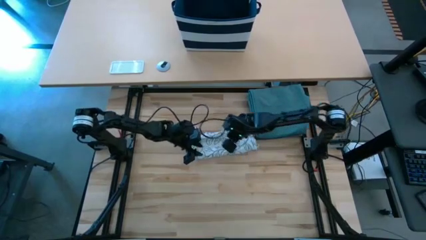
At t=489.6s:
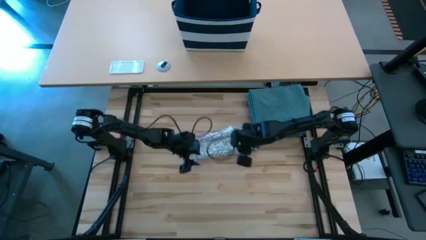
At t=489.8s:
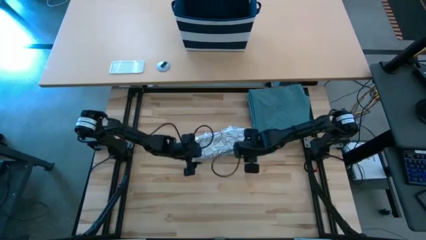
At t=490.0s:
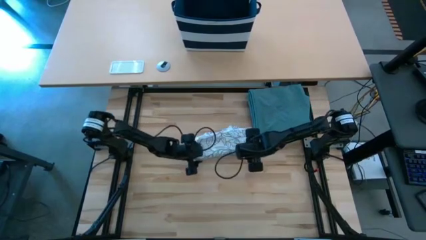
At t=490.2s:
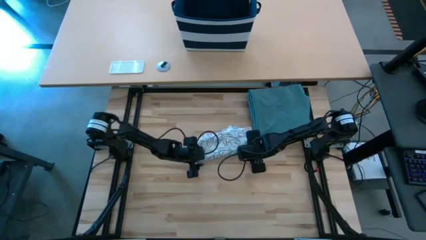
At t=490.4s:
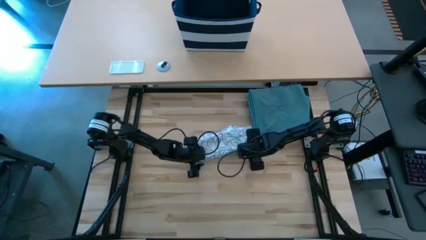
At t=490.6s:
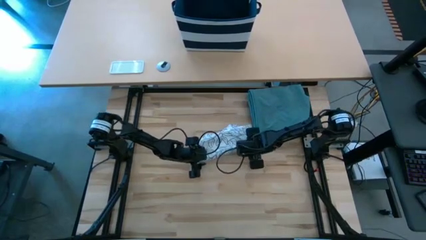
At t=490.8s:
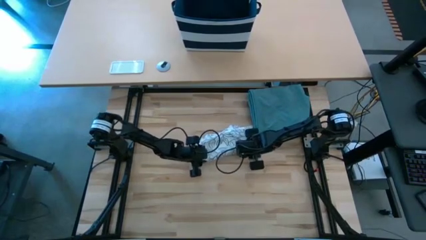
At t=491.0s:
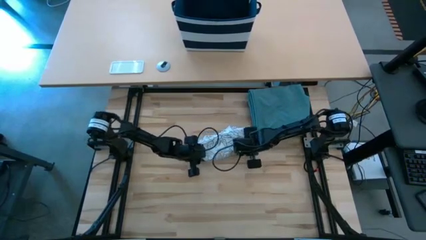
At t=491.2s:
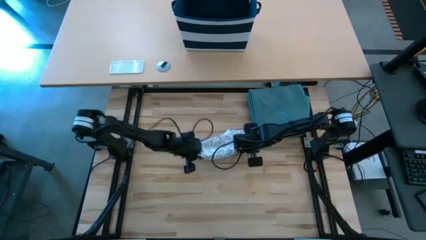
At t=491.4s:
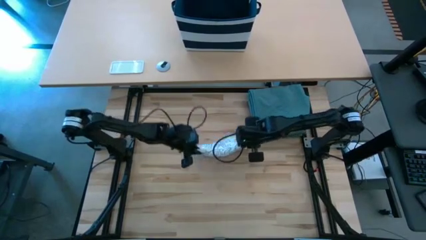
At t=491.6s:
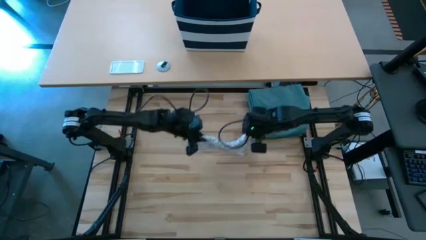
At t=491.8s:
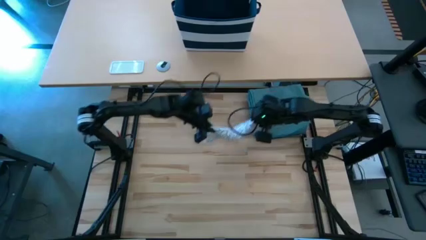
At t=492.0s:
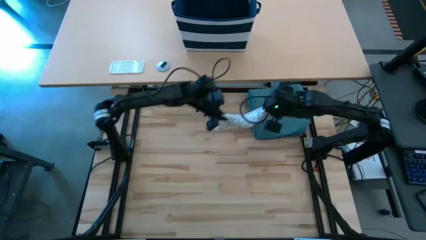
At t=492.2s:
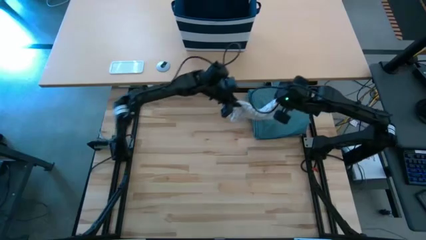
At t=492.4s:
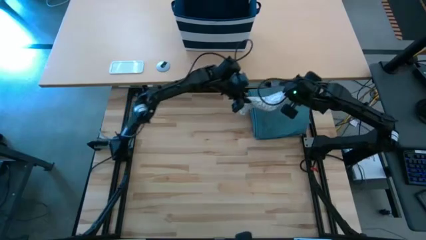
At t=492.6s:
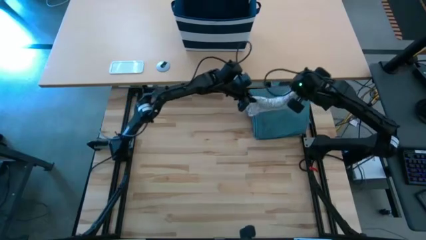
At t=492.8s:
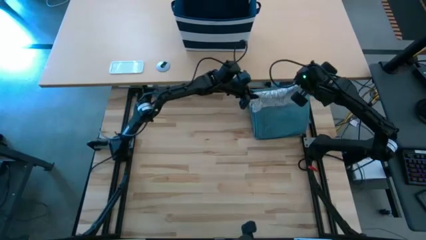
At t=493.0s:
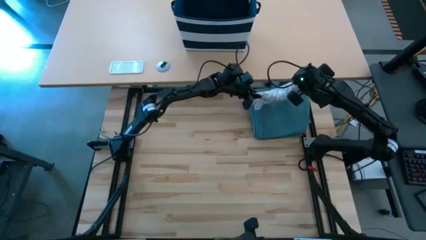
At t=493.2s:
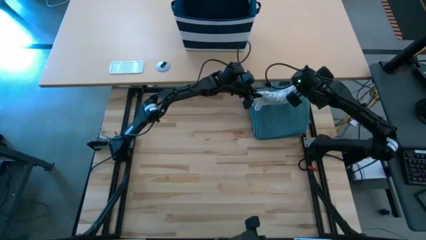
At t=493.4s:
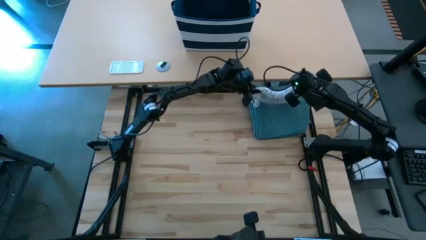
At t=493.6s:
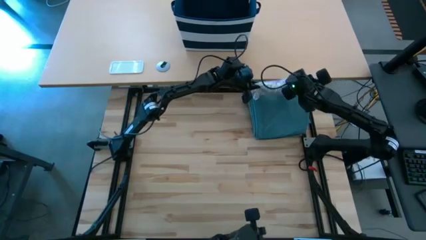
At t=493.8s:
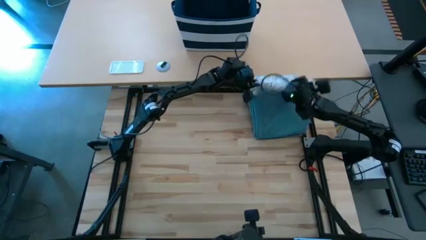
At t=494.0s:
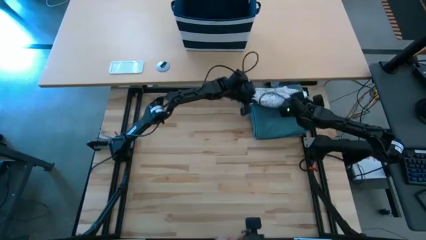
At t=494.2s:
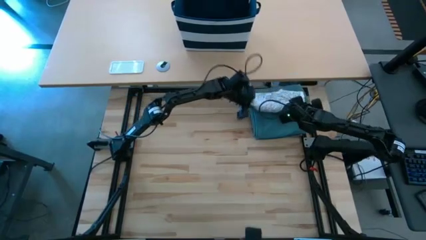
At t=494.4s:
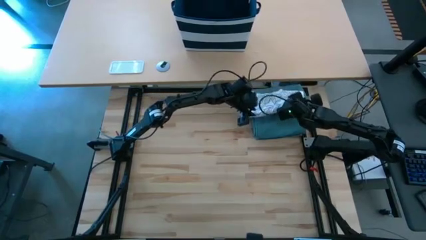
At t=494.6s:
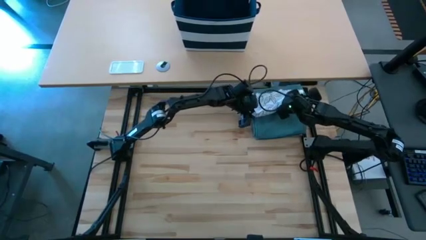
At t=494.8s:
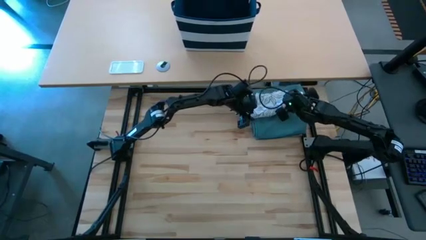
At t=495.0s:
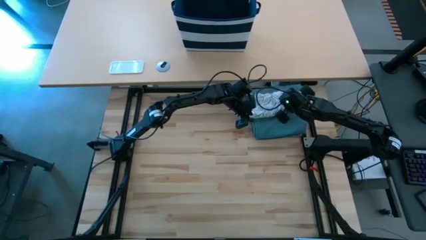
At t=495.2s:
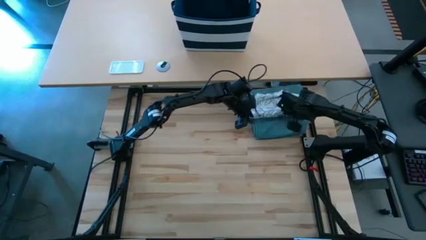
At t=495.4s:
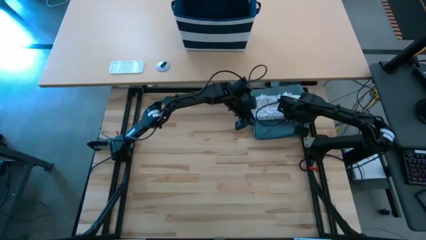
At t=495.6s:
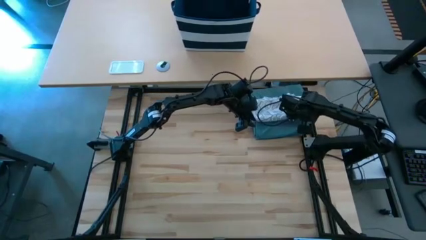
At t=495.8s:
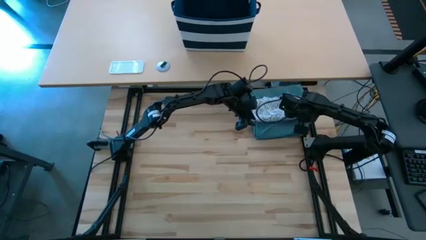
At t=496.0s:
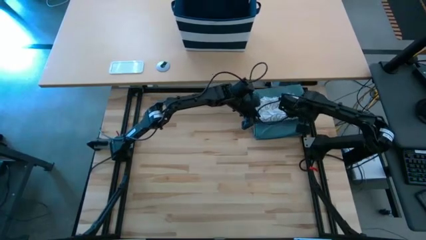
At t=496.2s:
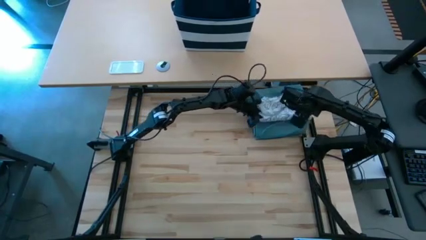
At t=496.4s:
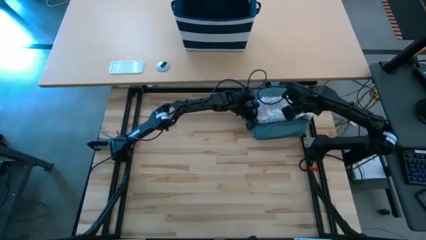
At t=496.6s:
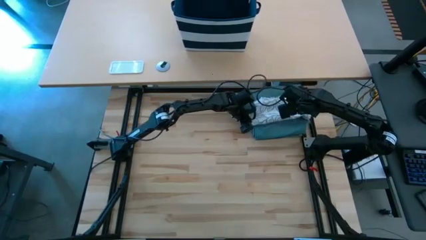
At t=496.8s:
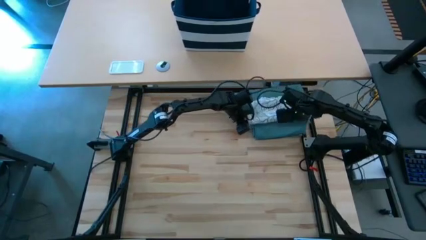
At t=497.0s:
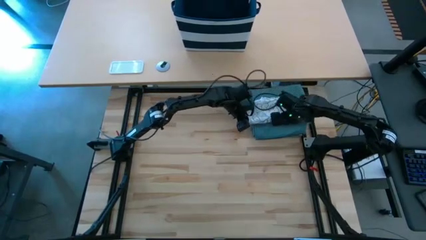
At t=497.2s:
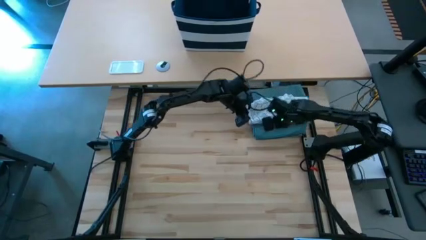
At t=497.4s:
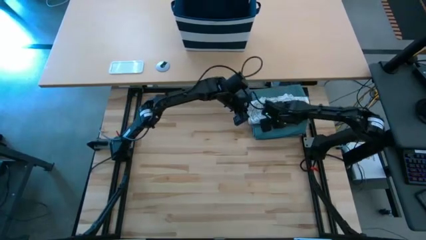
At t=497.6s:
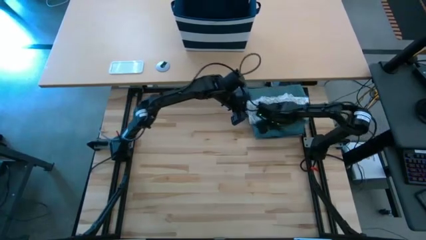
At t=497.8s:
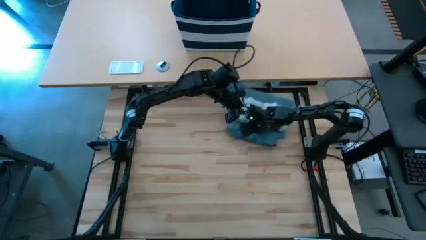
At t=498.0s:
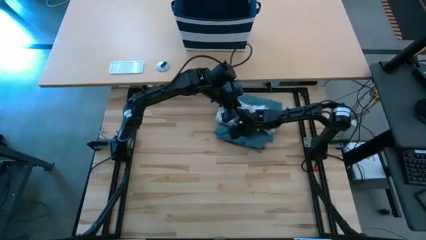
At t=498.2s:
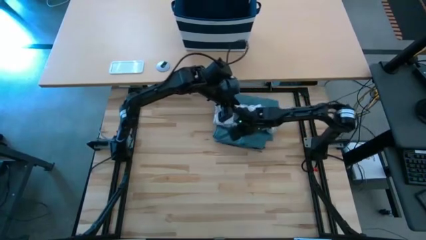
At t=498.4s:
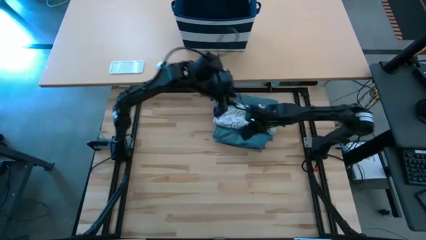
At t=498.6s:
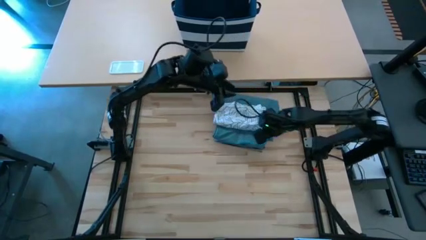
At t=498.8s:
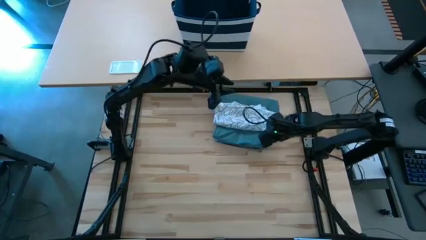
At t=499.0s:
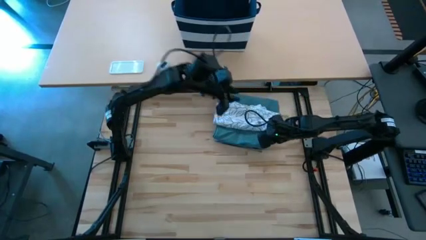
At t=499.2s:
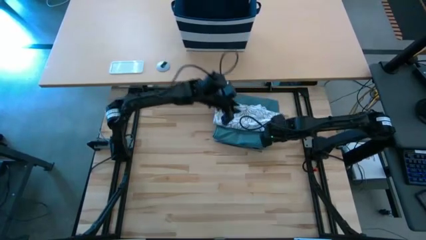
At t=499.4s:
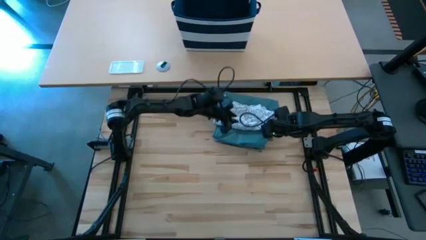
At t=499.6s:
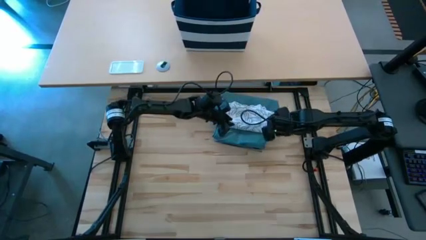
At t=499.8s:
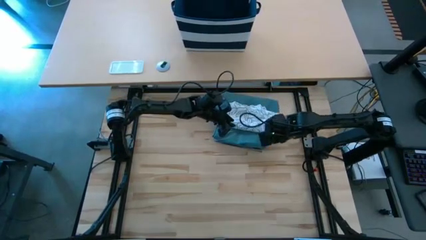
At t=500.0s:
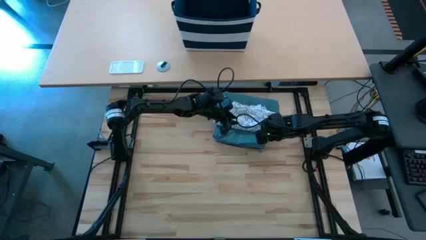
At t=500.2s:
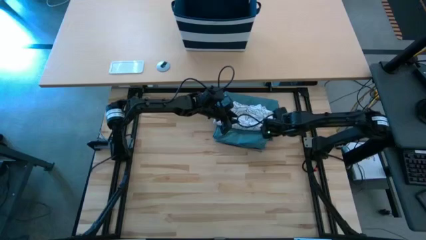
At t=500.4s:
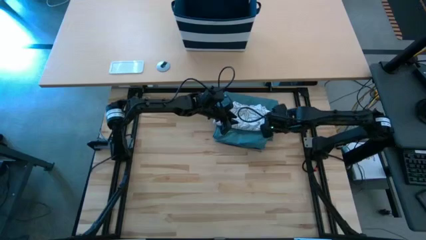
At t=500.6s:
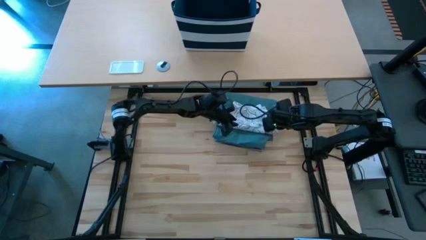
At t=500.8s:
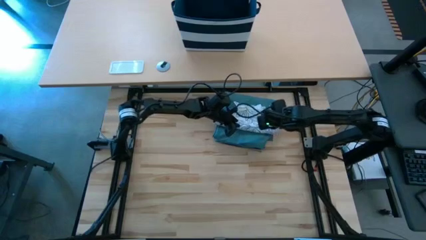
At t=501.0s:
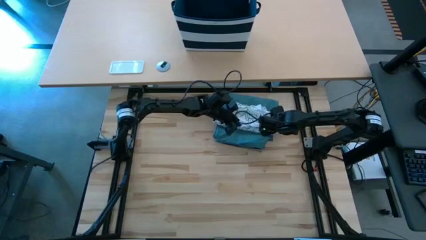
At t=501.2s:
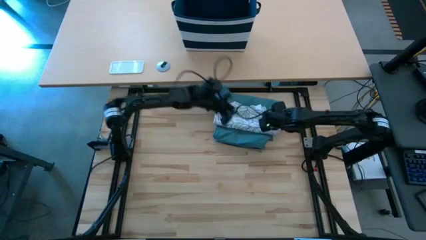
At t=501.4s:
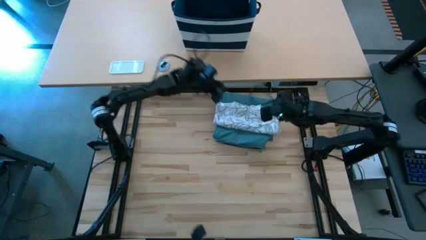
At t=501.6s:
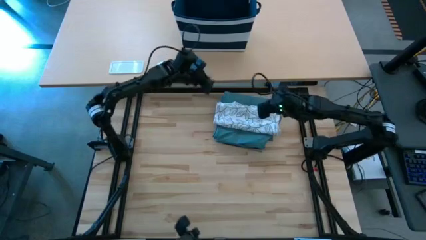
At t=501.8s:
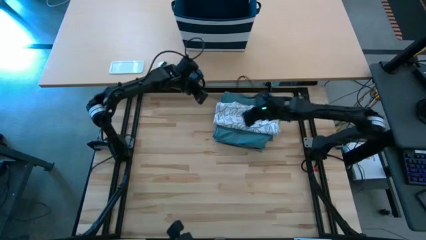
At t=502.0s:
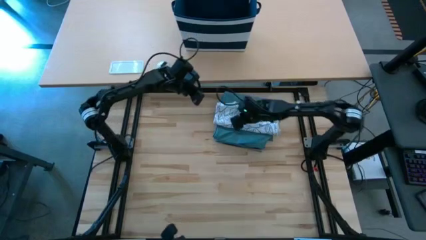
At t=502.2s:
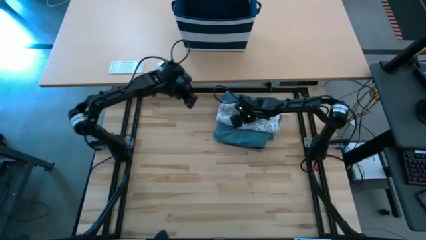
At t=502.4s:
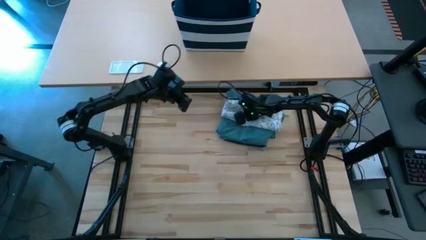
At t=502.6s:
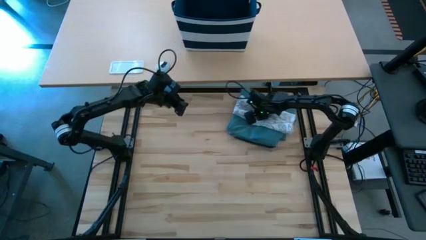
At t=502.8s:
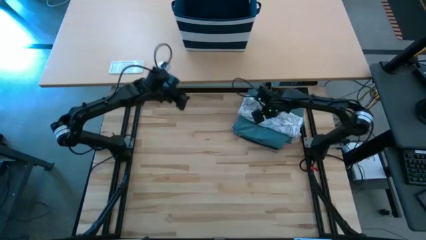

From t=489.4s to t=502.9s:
Task: Fold Laundry from Bin
Stack the folded white shirt on top of the folded blue pants

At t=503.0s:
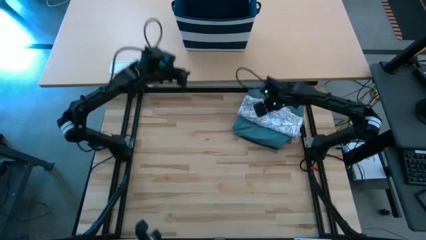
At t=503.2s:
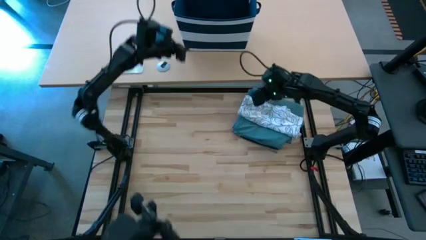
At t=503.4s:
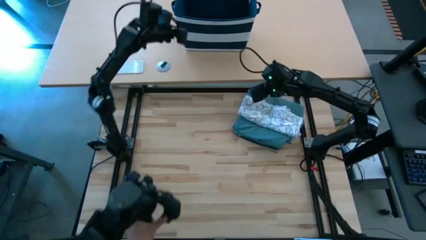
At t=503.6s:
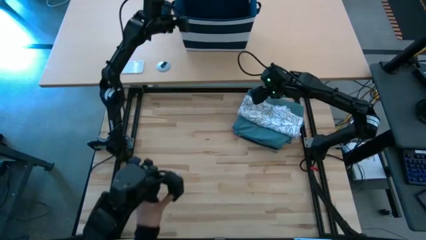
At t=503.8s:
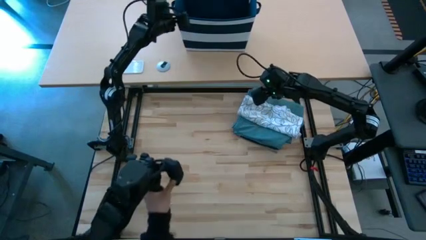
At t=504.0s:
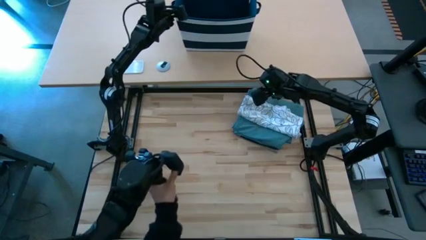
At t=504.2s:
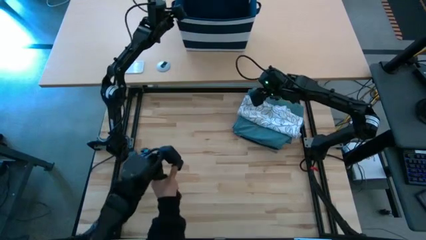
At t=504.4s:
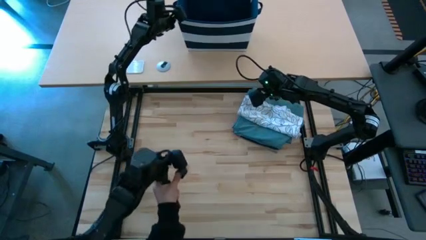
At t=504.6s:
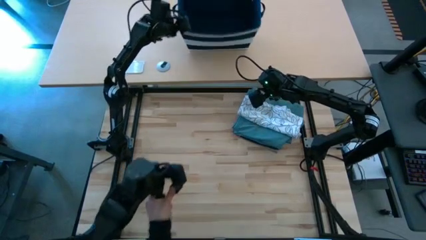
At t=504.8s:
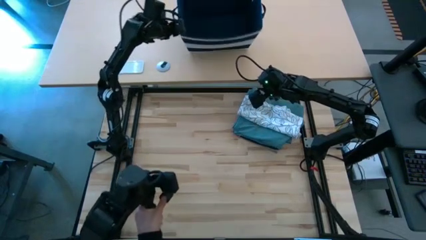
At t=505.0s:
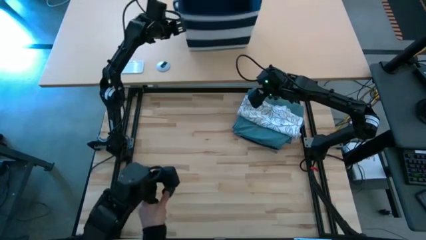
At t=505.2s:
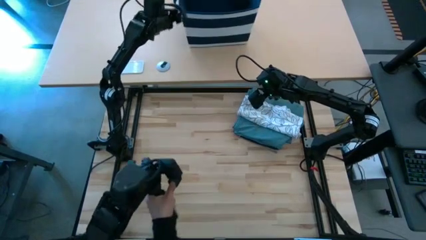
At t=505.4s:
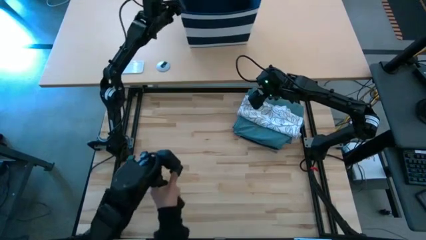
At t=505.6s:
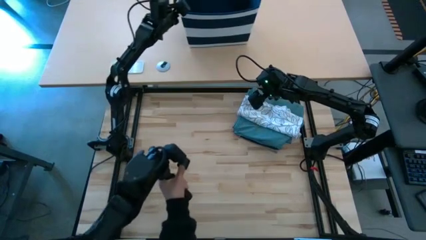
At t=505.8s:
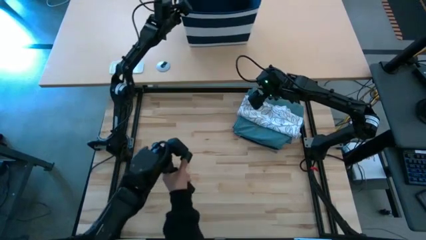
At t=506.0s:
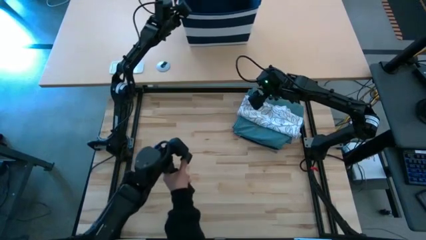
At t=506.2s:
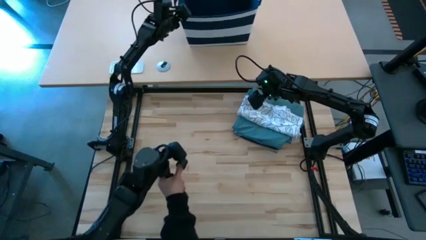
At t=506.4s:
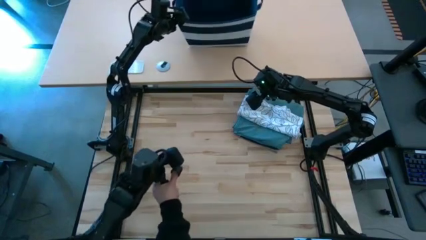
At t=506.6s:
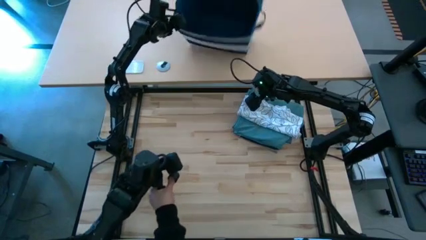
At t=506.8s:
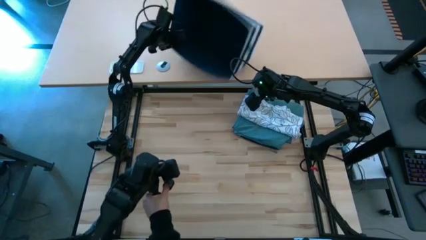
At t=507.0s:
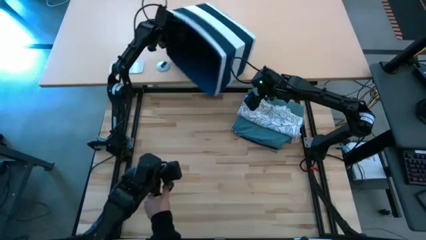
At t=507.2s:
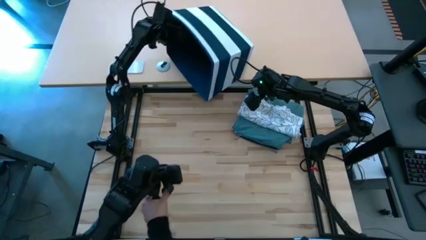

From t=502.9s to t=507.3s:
Move the blue laundry basket to the top middle of the table
